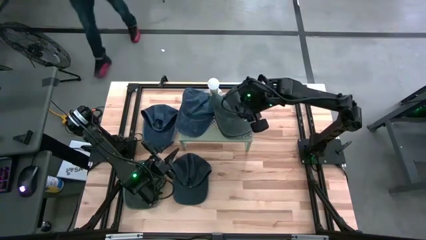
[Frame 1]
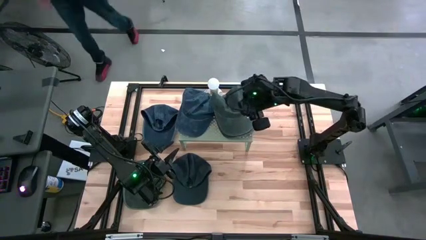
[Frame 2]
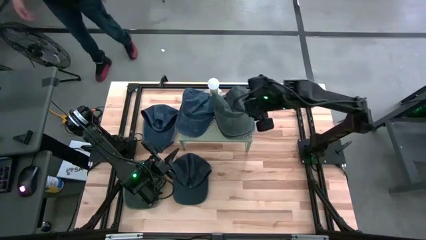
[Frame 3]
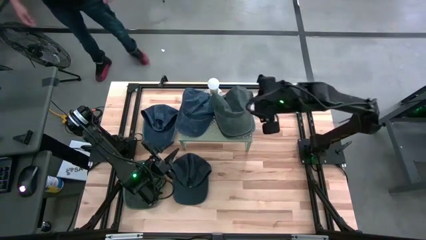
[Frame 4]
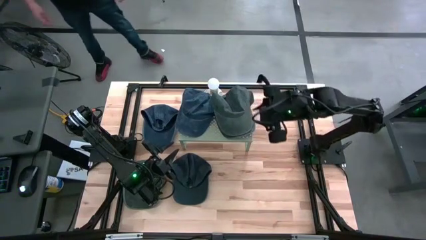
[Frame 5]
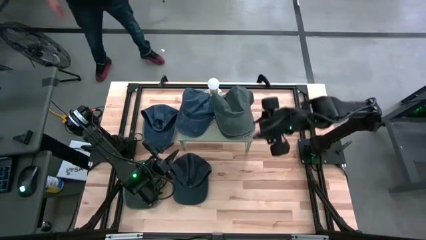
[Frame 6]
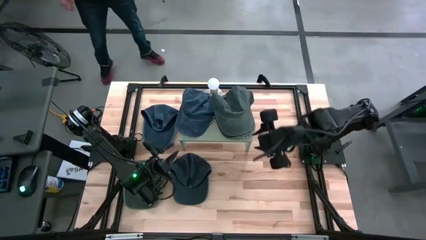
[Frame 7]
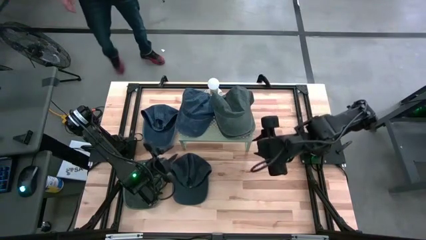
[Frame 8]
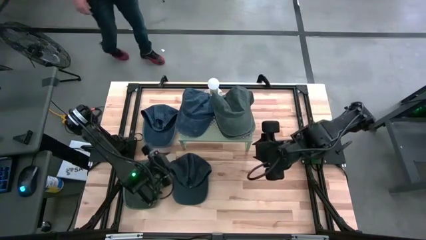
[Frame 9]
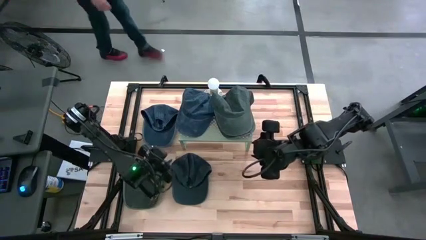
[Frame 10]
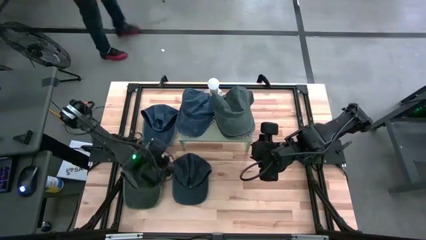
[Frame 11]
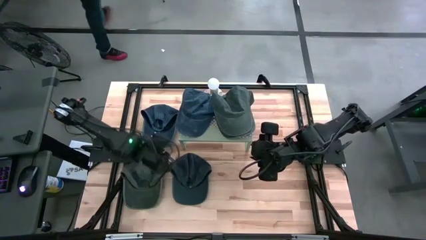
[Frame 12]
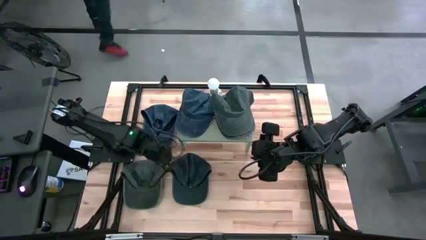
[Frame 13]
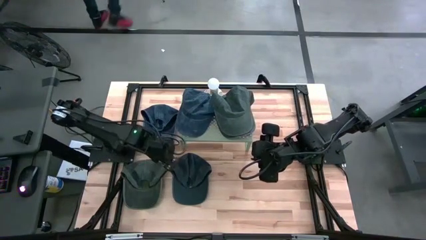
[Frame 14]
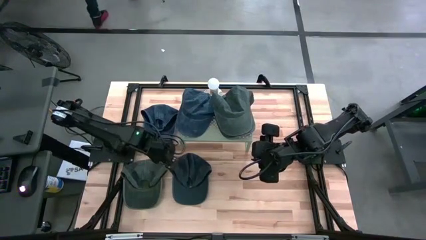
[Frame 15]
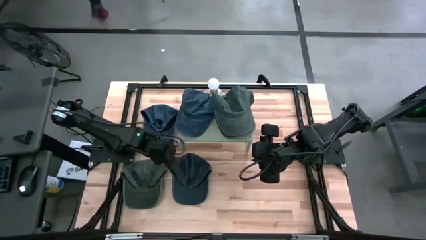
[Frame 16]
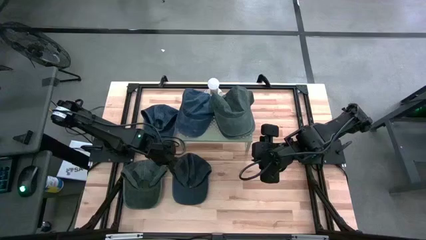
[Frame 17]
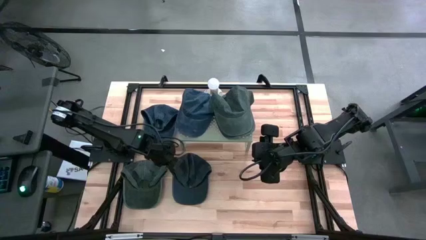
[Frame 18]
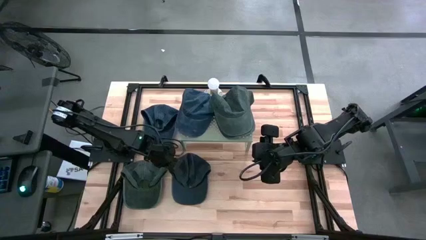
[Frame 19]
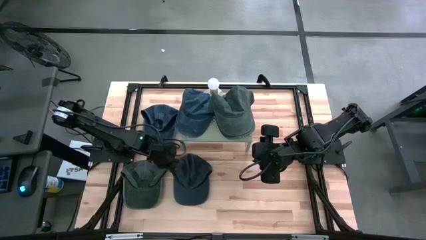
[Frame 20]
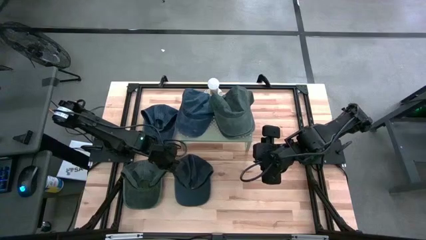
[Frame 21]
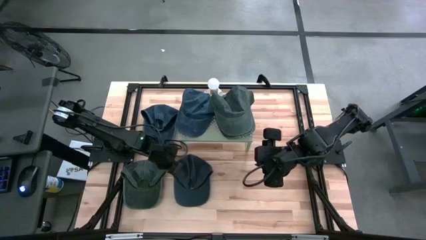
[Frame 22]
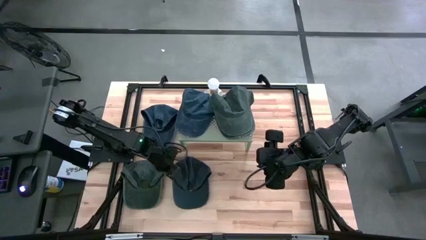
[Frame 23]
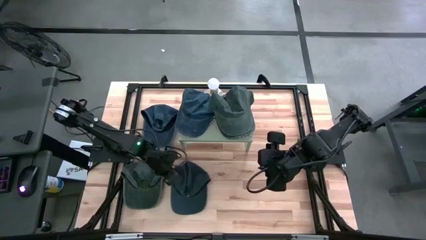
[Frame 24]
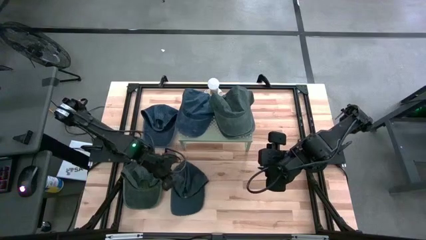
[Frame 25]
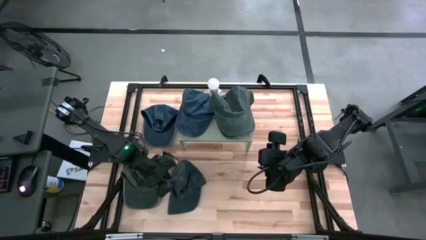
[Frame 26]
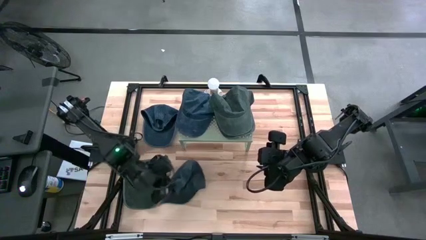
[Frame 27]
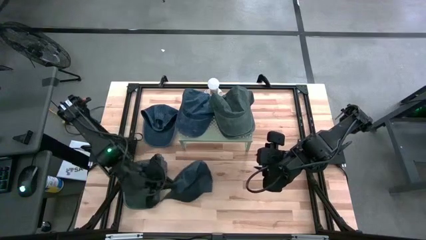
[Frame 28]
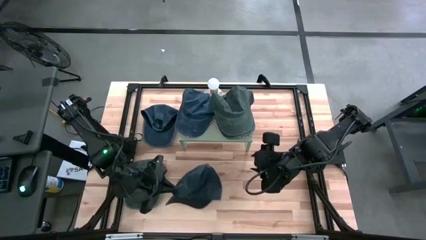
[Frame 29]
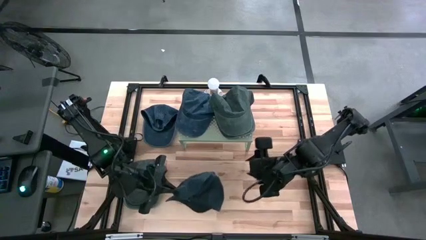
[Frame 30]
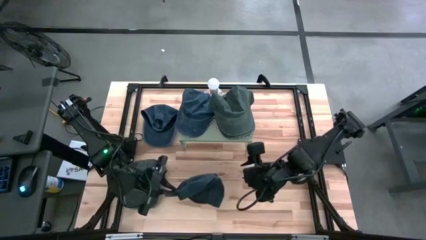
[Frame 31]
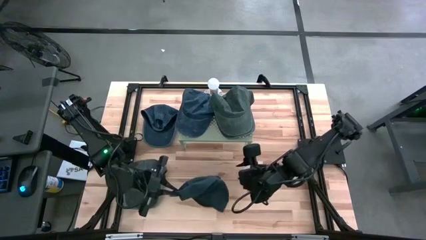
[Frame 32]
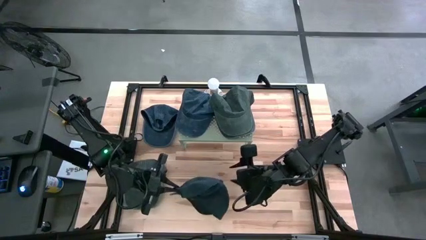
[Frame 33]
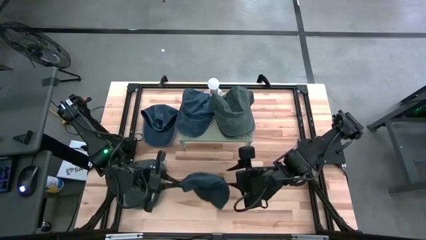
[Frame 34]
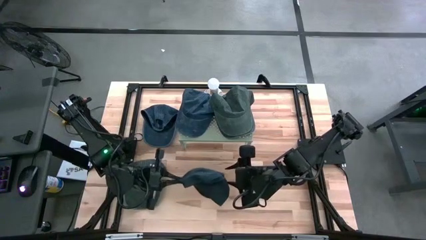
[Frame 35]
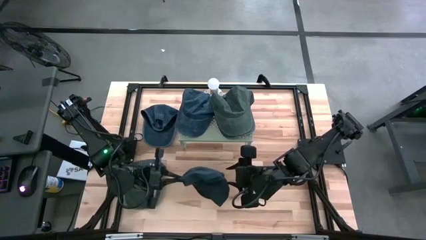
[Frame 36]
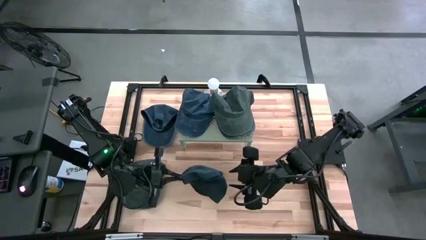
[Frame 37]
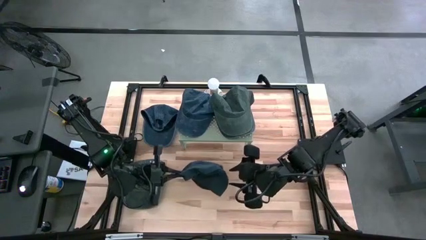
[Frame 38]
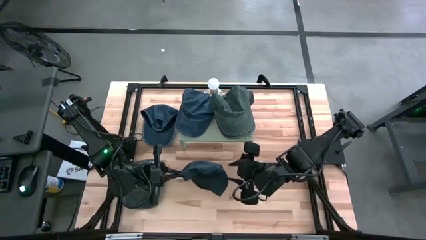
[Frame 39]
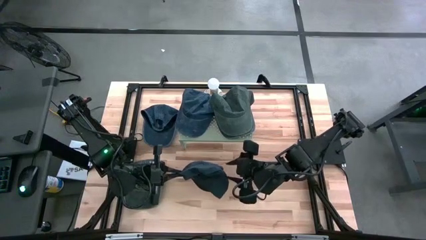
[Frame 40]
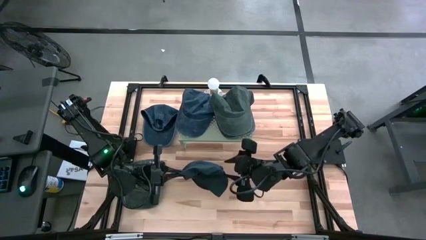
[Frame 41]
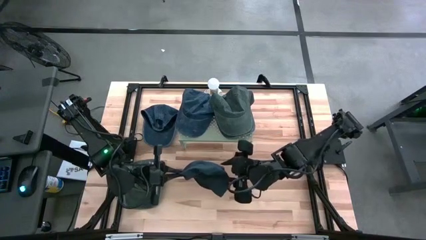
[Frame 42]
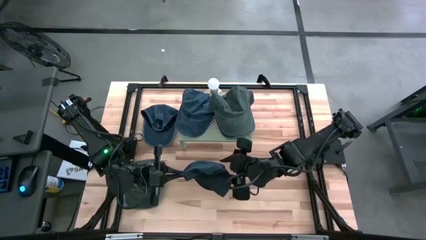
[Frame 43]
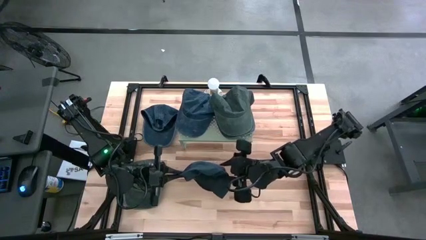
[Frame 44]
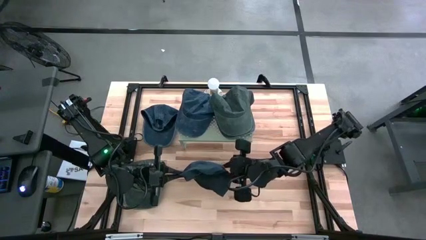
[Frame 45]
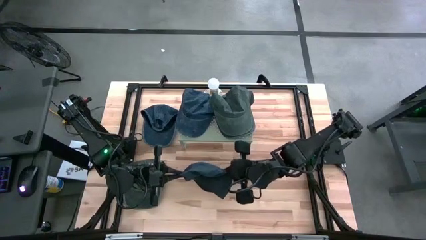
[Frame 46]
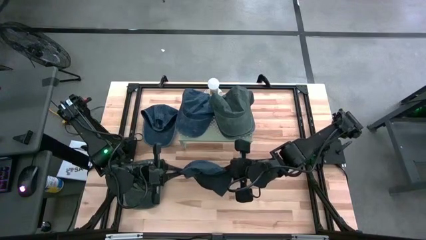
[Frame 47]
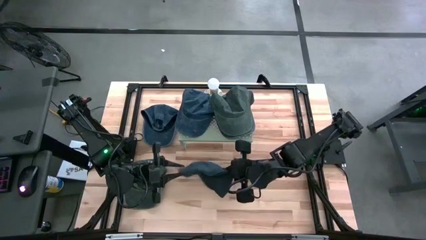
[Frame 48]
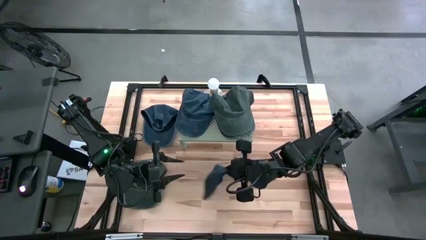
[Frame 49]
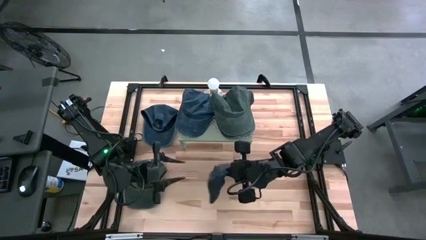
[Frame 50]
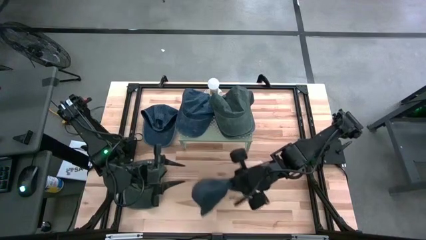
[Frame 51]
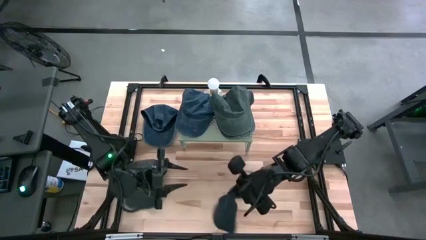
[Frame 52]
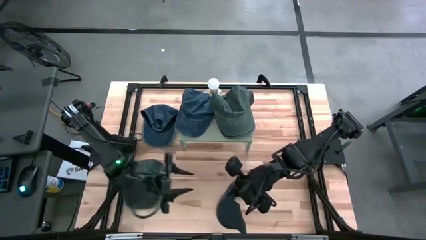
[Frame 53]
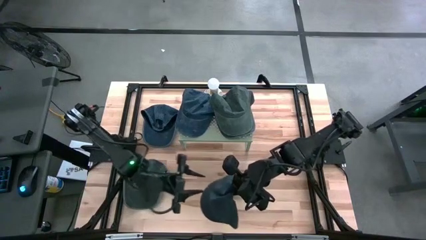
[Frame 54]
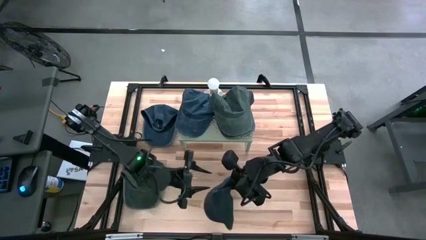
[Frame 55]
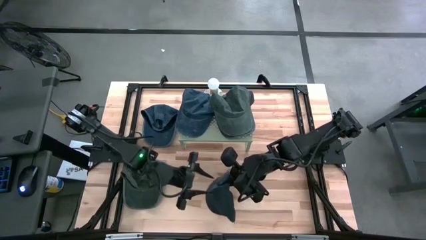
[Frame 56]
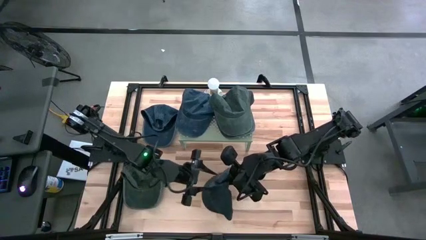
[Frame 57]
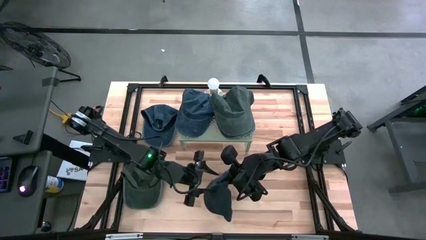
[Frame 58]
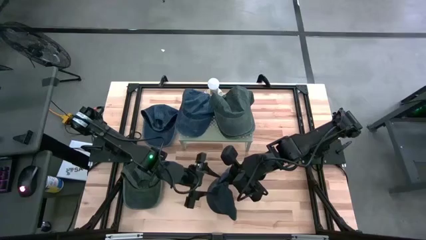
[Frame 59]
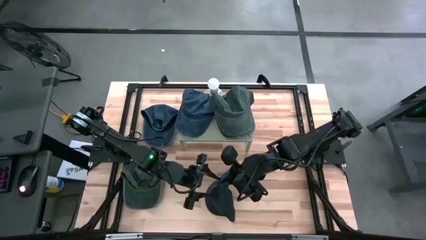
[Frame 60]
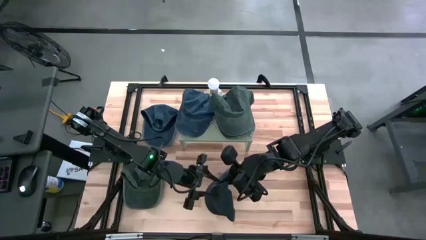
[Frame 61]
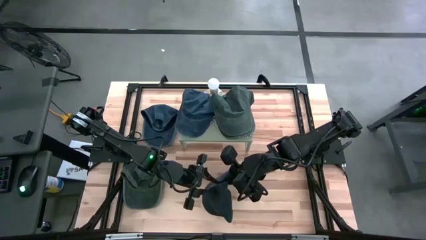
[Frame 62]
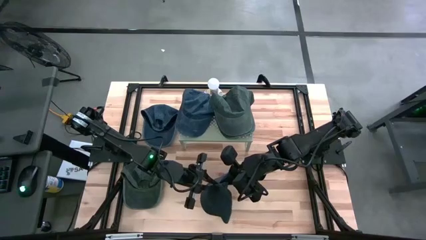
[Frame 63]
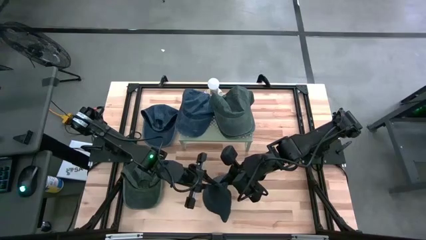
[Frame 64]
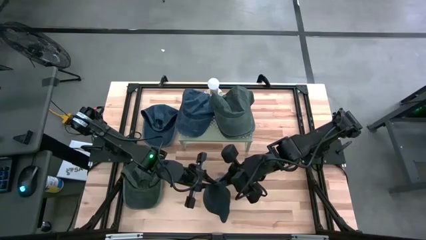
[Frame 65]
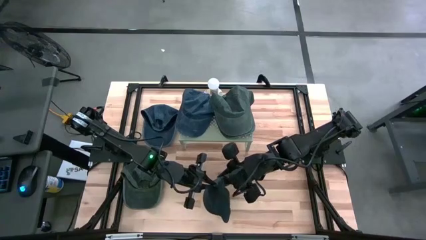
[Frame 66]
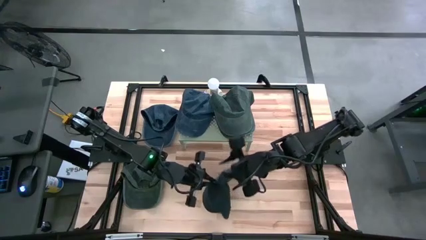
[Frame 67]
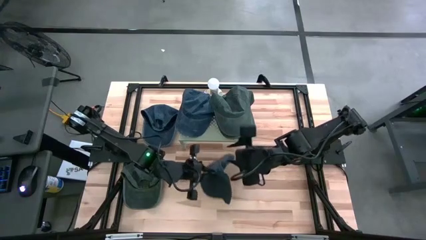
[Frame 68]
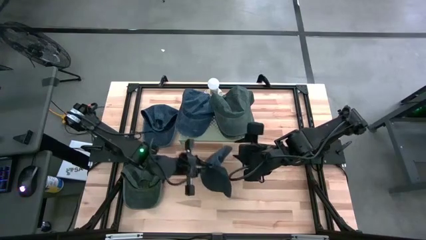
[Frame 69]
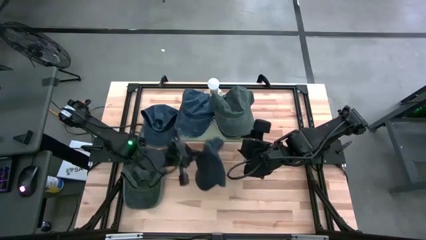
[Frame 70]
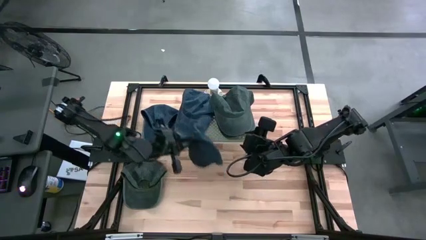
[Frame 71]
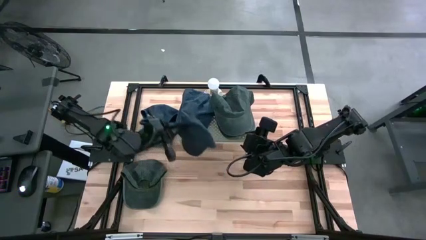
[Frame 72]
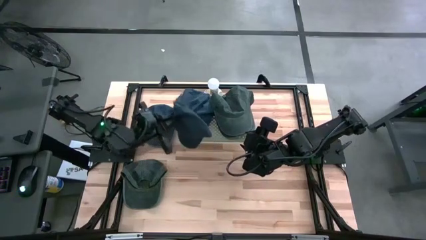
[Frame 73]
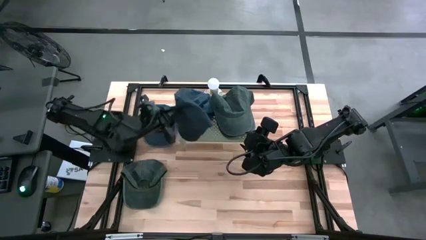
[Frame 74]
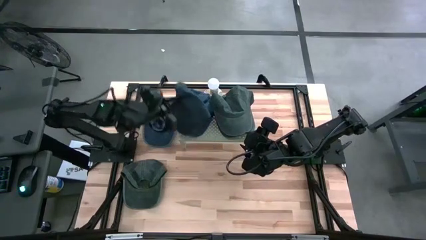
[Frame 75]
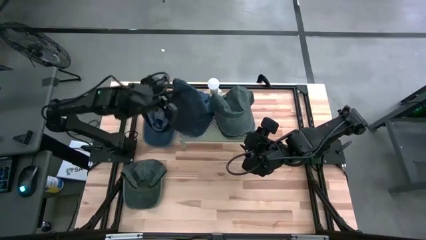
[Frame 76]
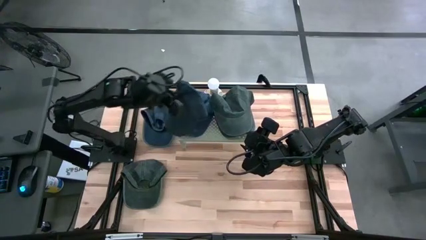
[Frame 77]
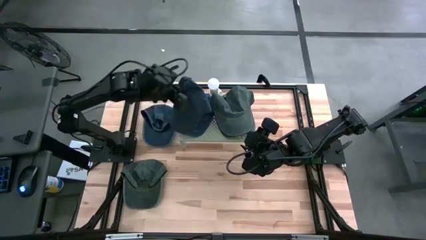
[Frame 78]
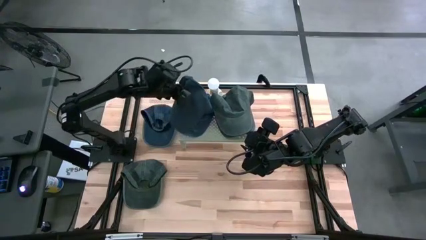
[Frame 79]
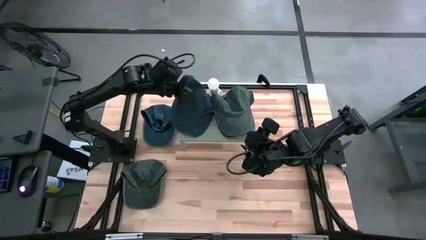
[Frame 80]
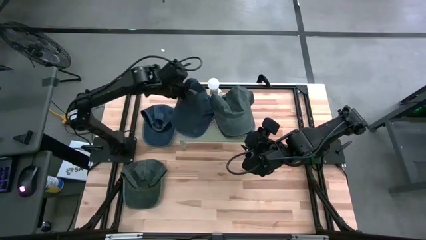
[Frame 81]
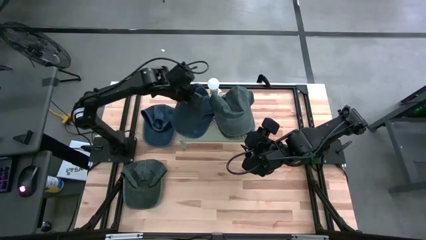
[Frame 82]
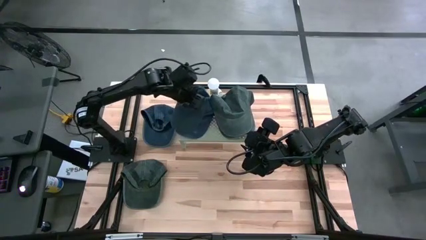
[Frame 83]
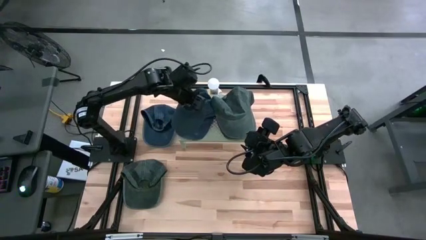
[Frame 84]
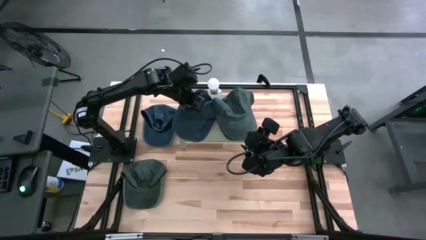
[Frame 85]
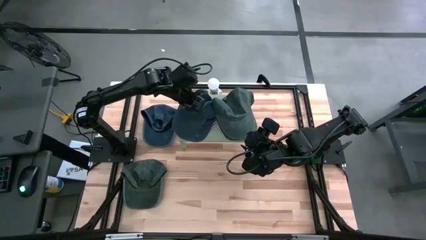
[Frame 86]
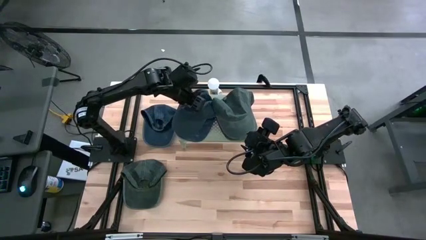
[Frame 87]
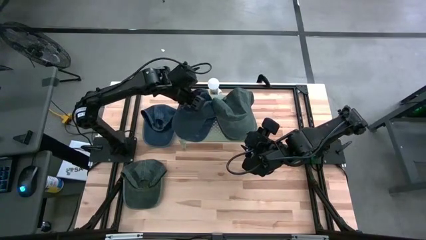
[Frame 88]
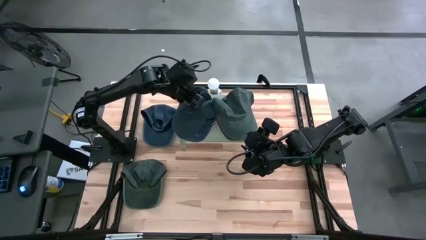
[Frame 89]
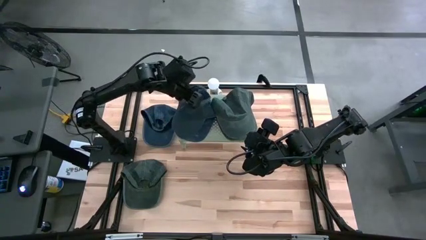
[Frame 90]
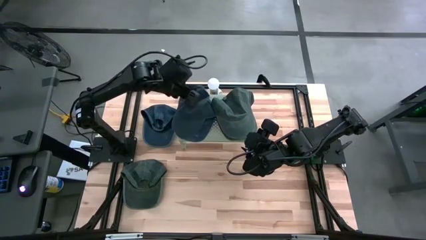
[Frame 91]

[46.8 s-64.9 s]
Task: Pick & Place hat
Stack the bottom dark blue cap on the top of the dark blue cap on the shelf
